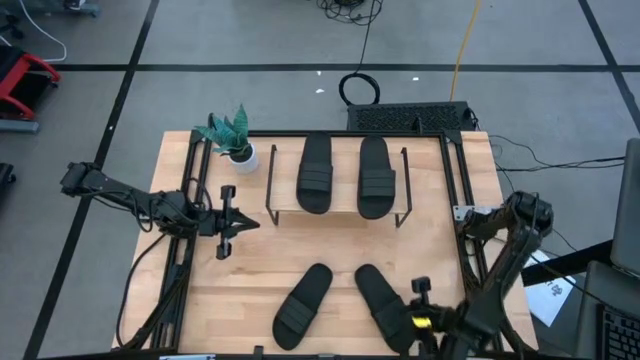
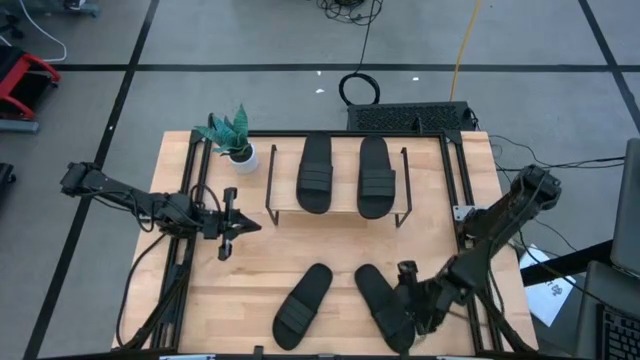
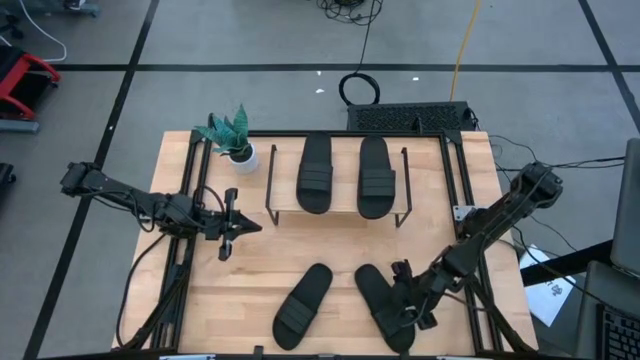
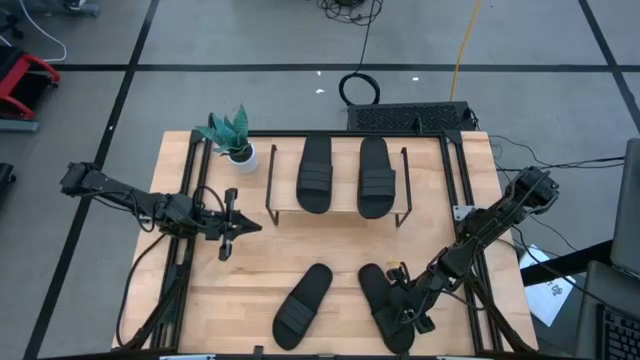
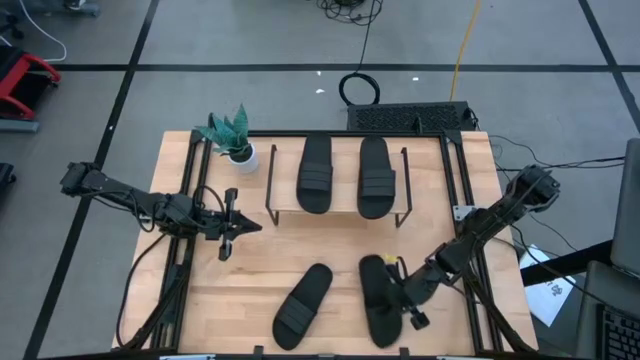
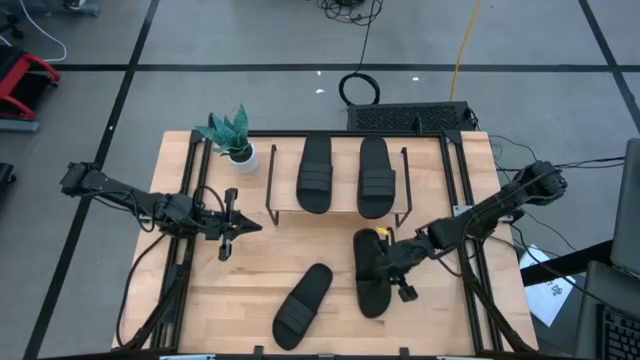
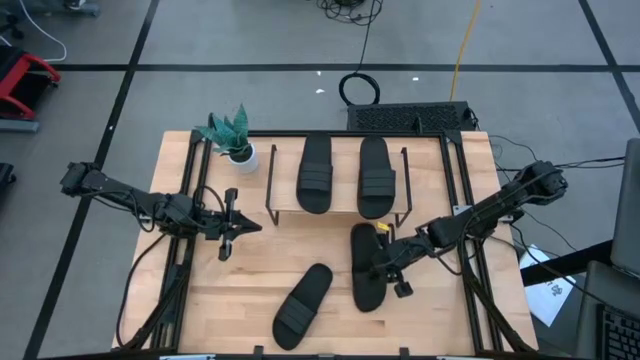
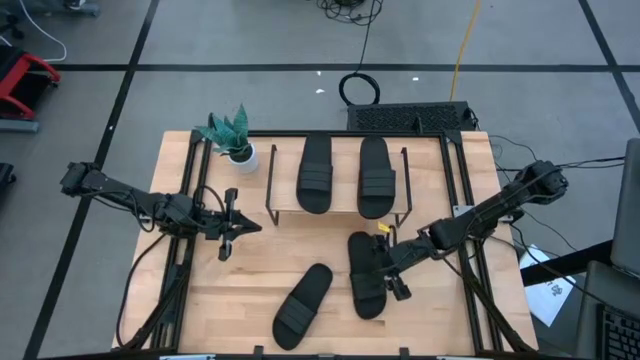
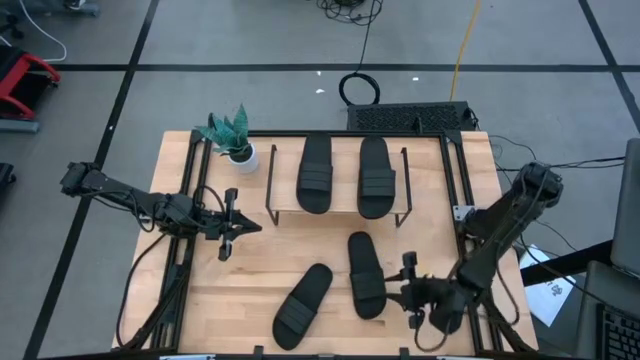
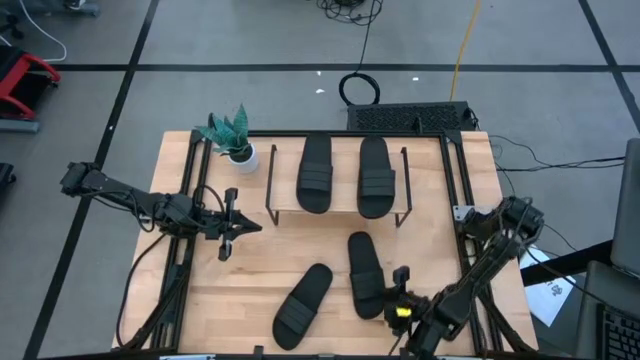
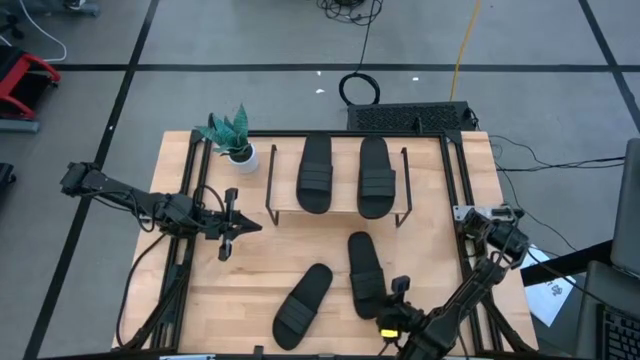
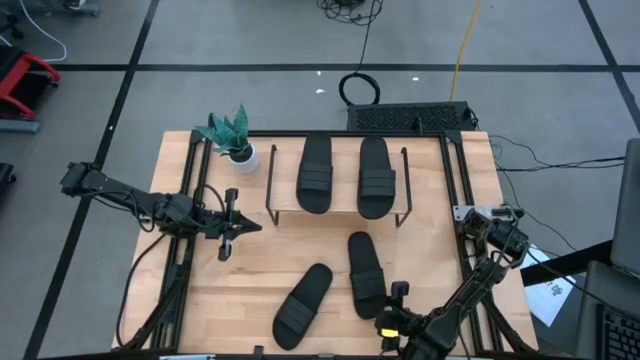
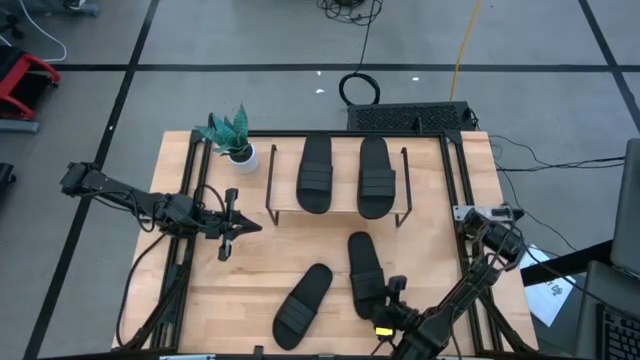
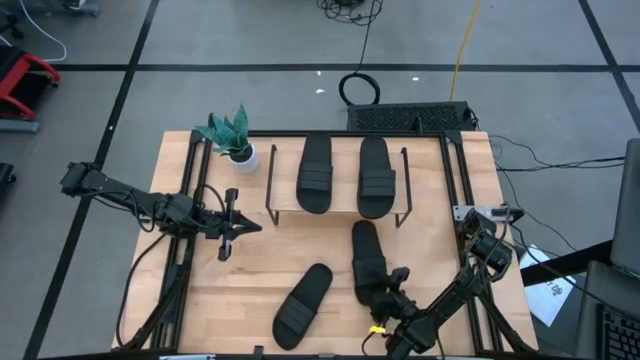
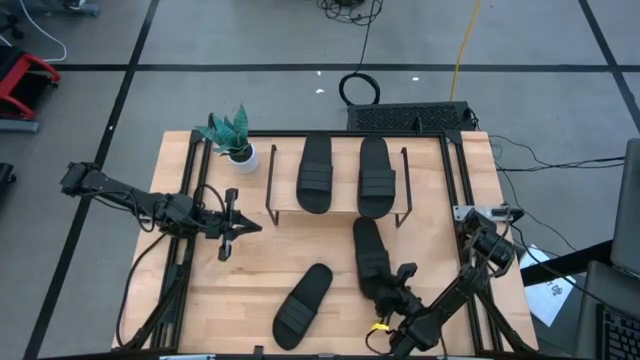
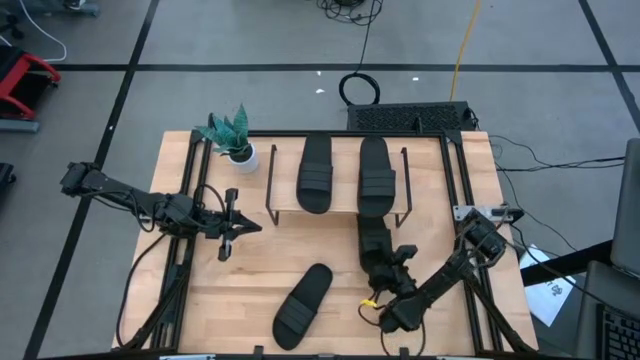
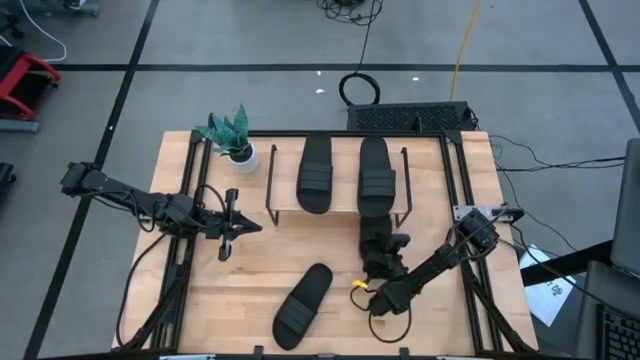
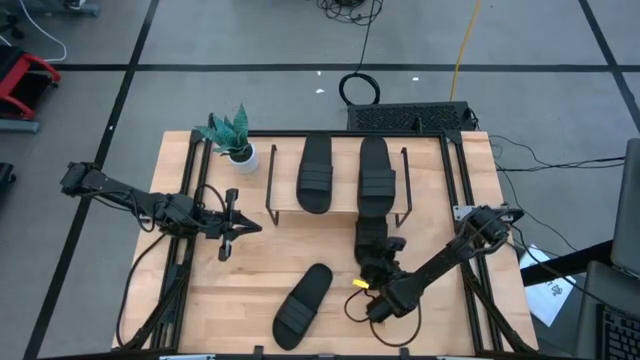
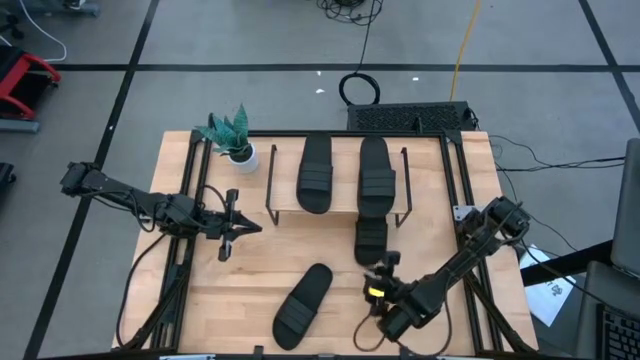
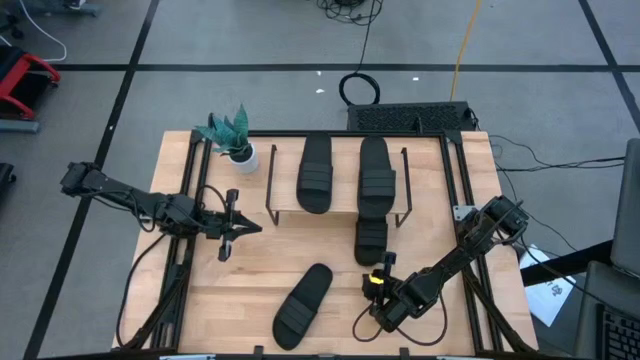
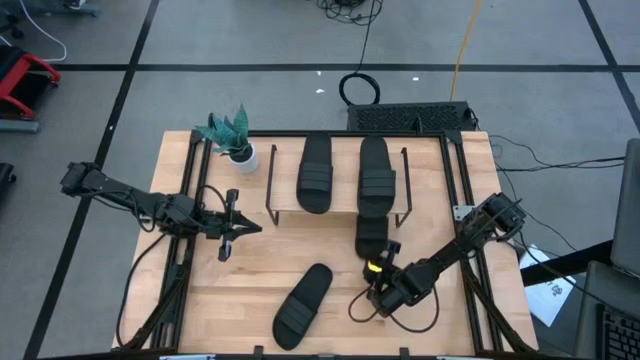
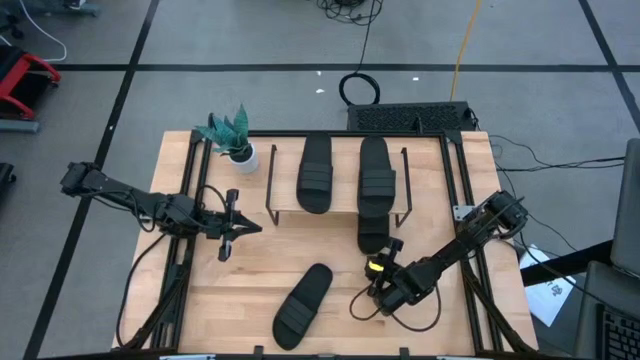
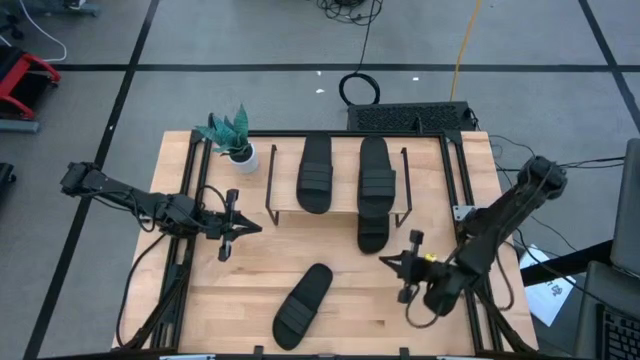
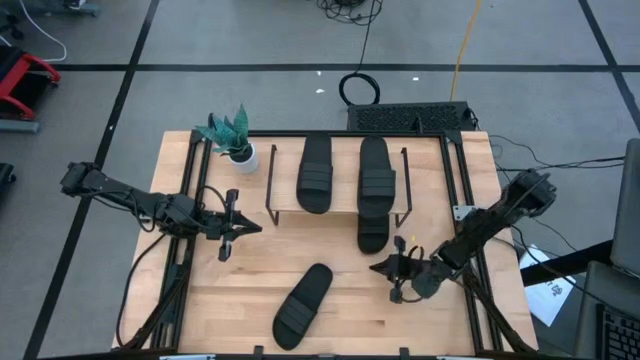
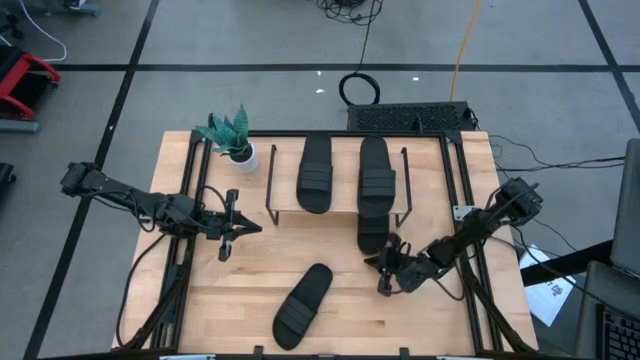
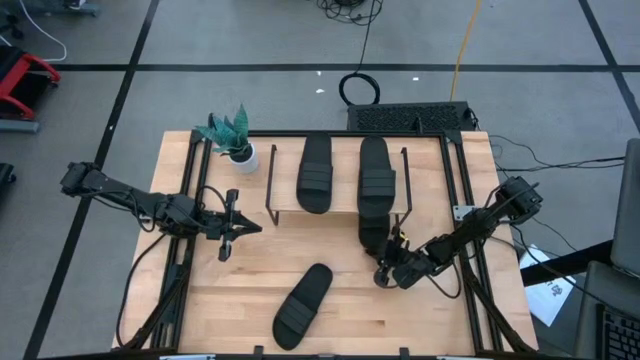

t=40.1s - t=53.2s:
Task: Pick and place slides into the shelf
Put the black slipper under the shelf

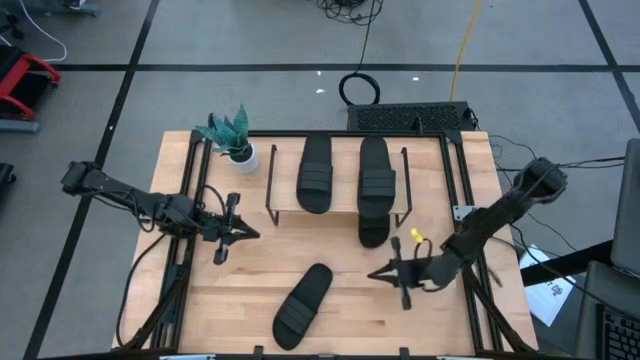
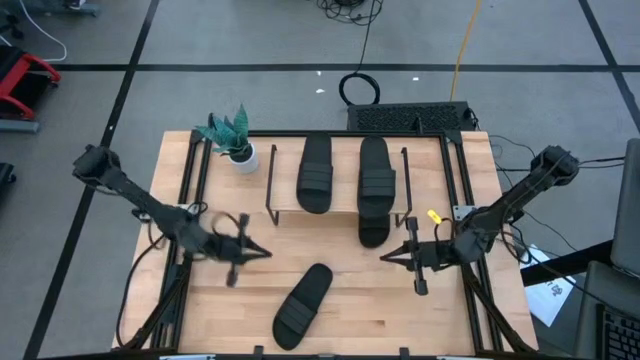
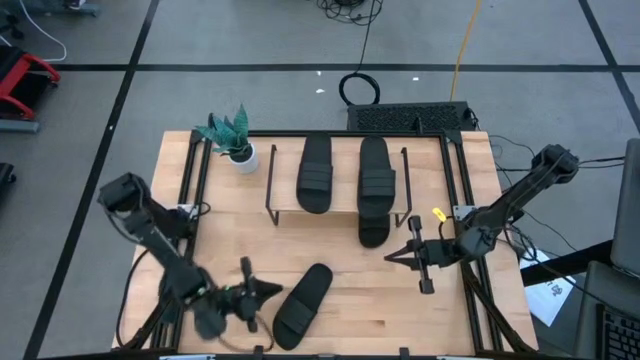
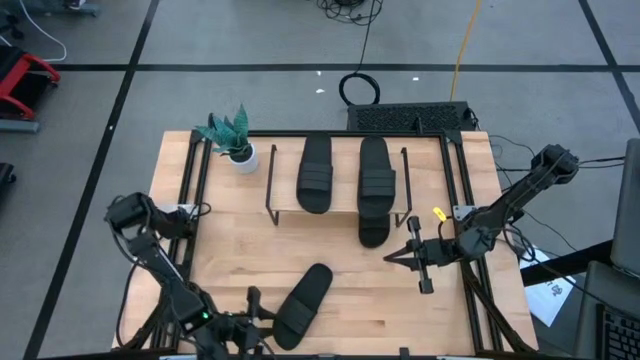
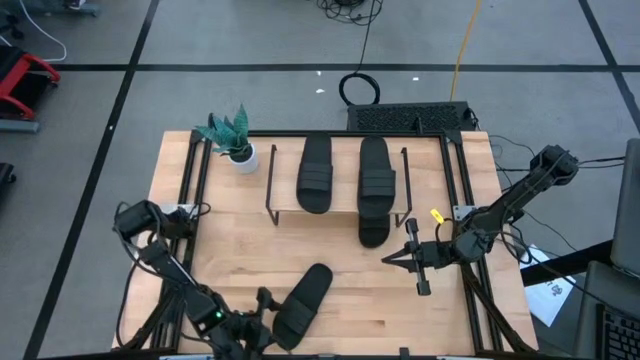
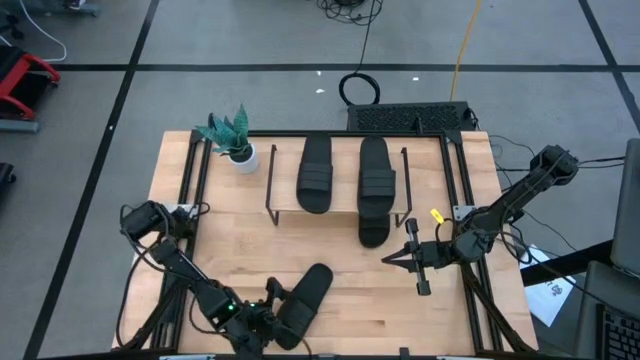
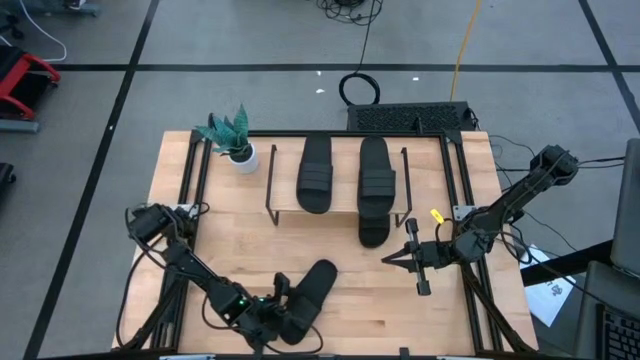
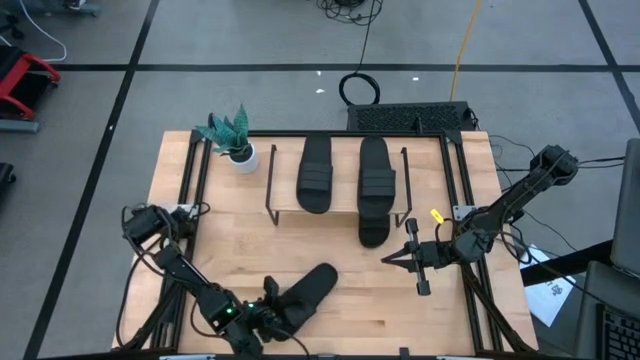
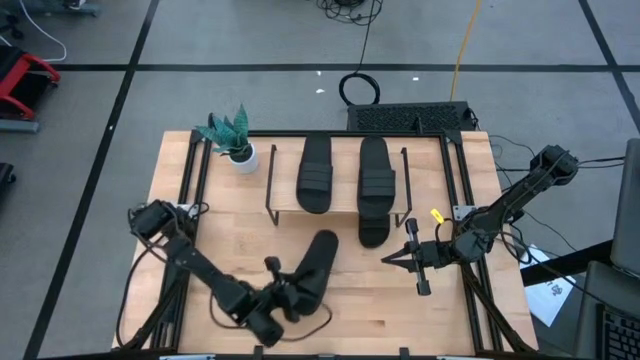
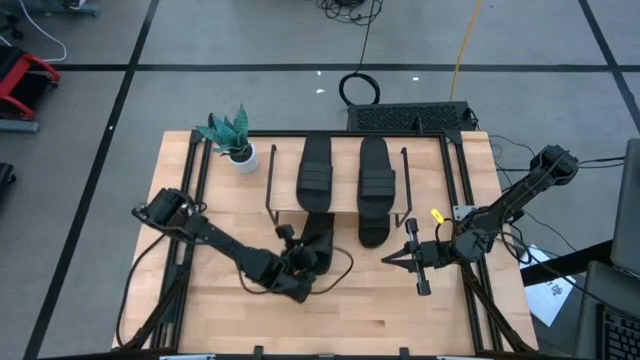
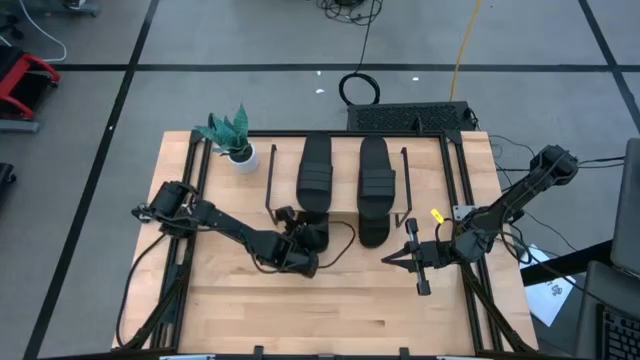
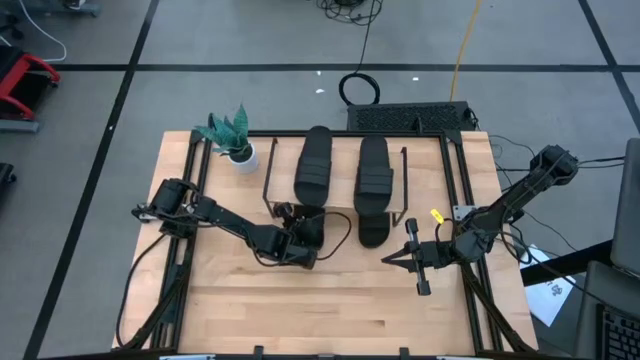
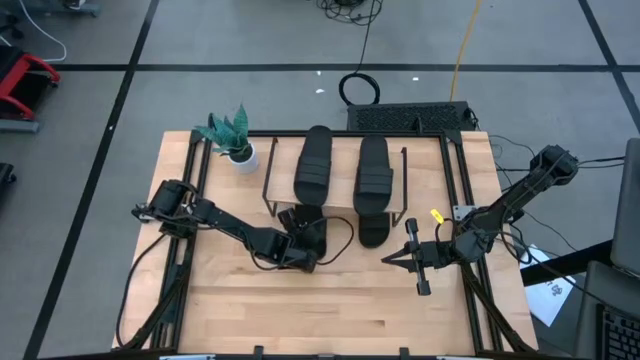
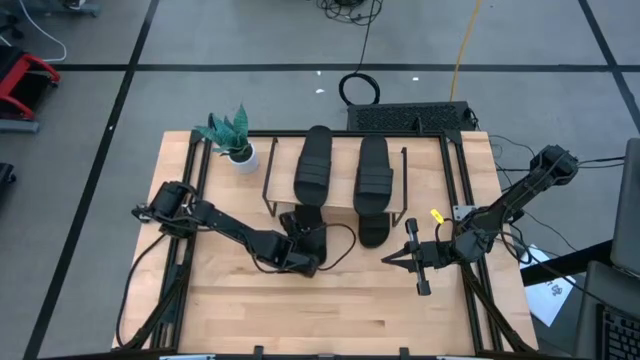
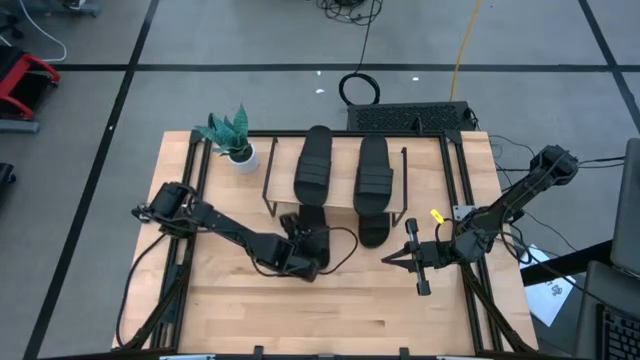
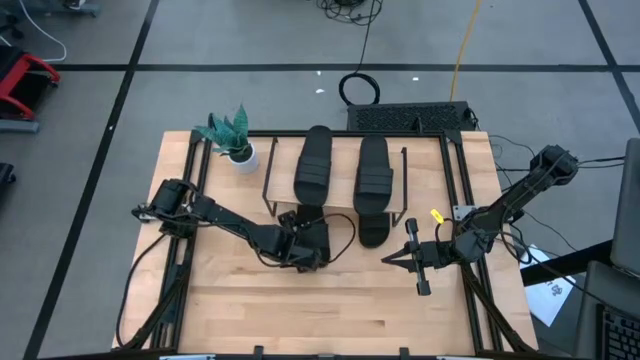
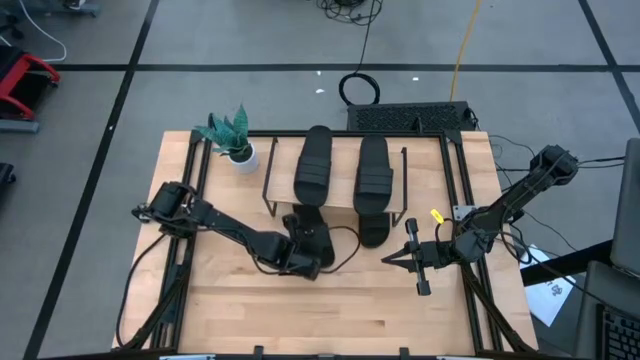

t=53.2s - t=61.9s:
Put the black slipper under the shelf
